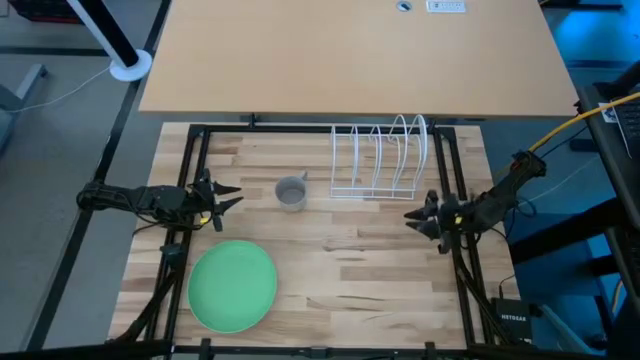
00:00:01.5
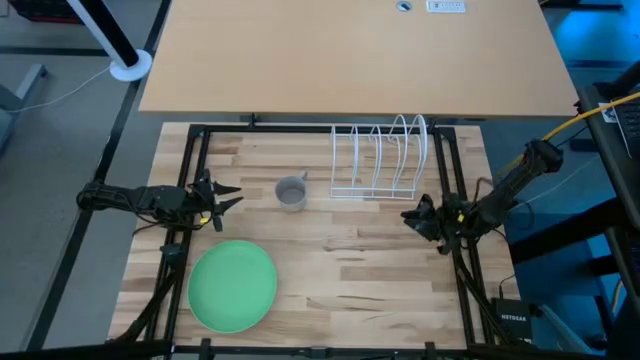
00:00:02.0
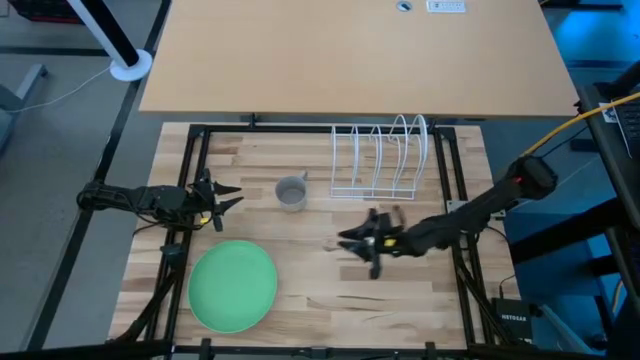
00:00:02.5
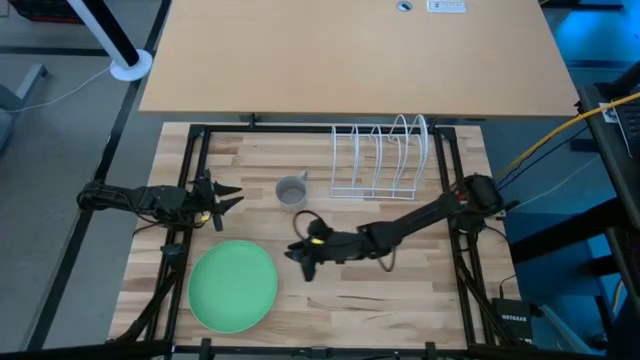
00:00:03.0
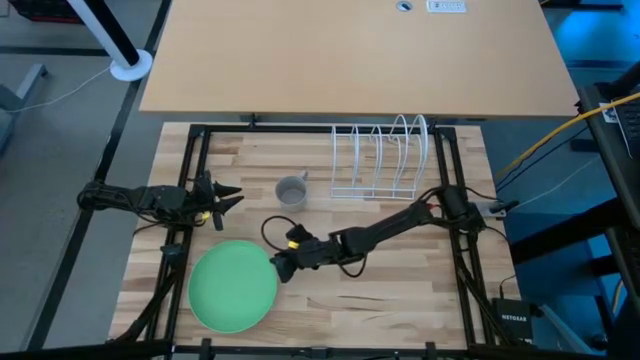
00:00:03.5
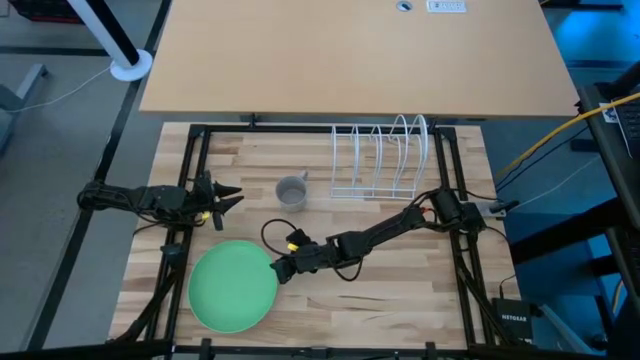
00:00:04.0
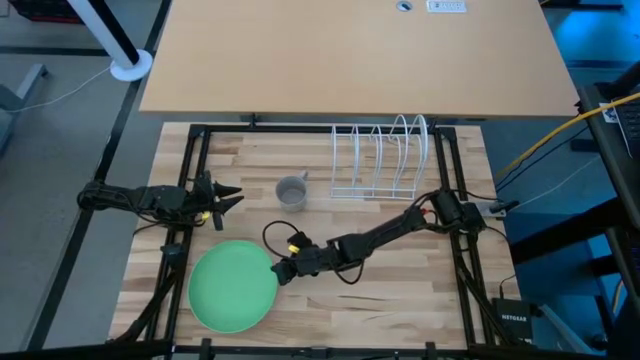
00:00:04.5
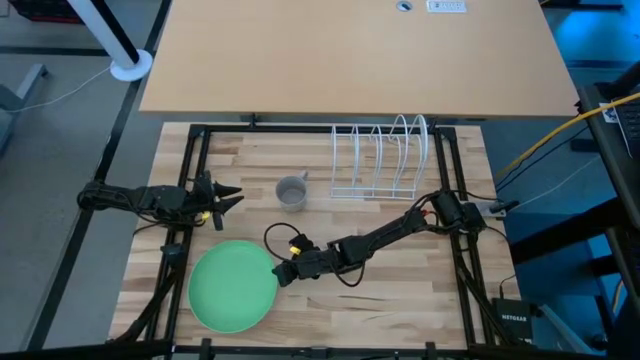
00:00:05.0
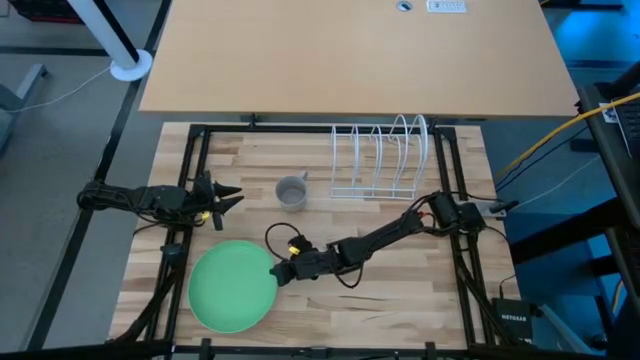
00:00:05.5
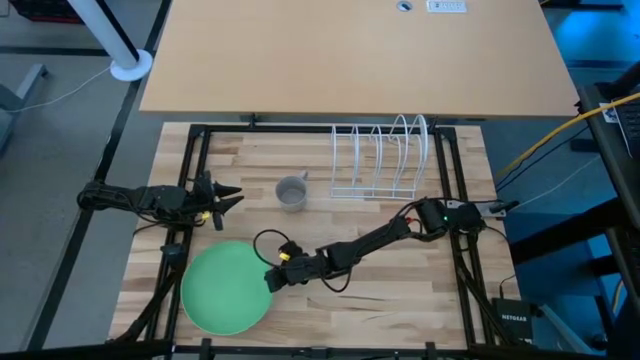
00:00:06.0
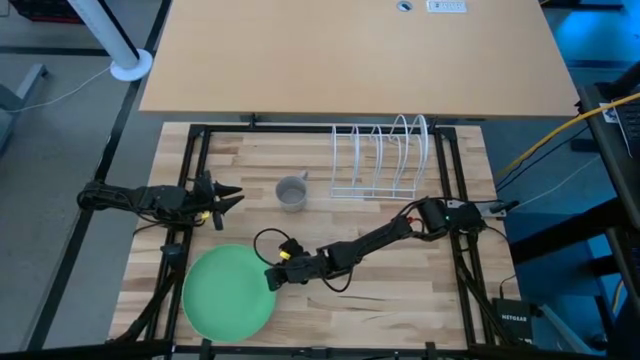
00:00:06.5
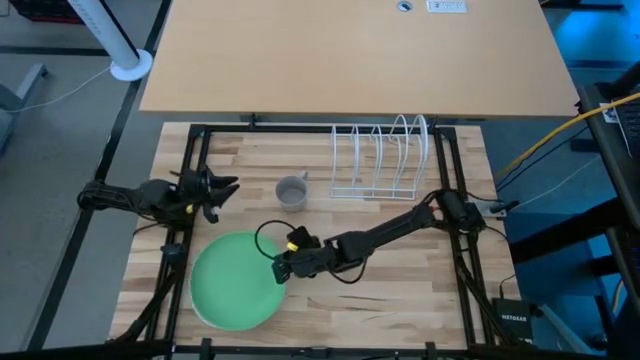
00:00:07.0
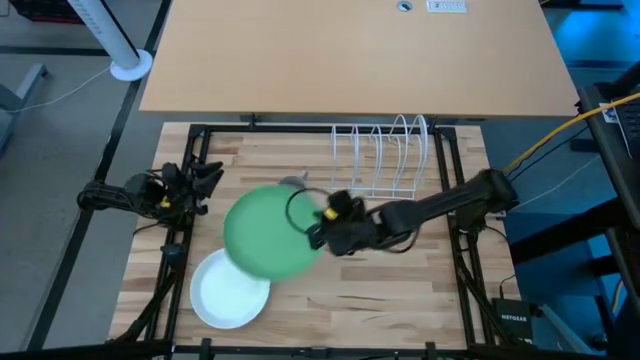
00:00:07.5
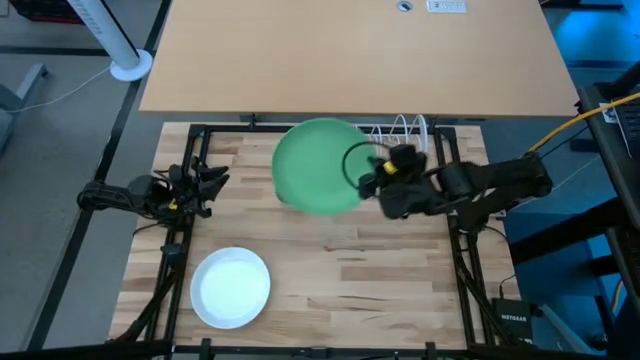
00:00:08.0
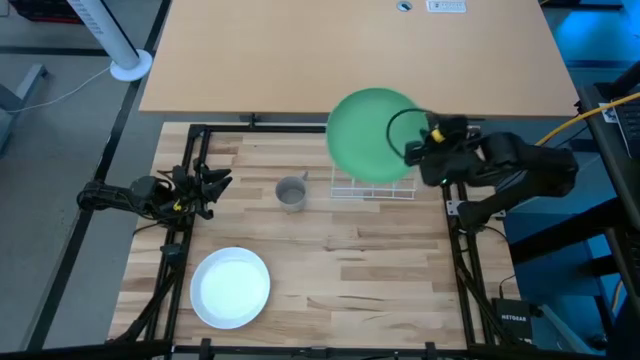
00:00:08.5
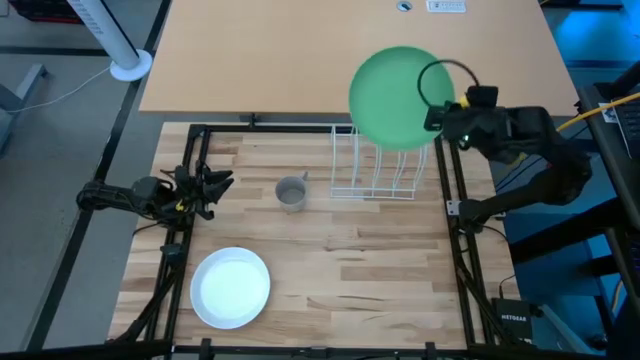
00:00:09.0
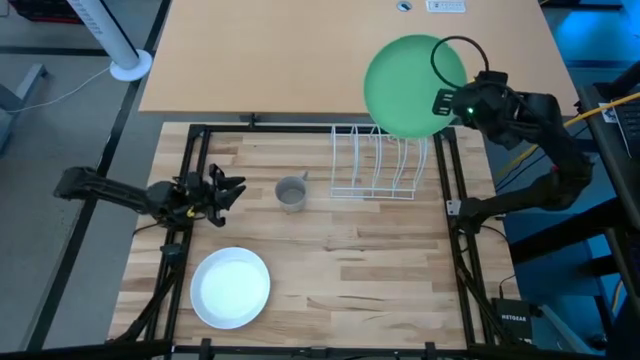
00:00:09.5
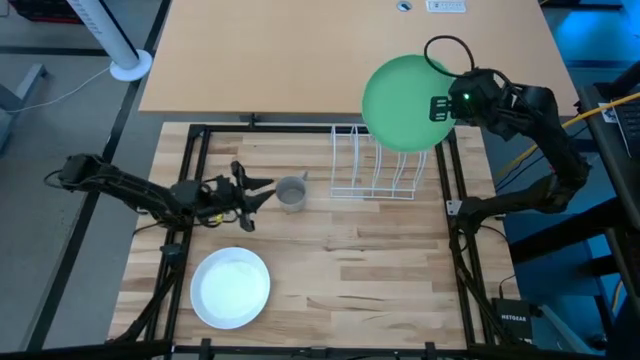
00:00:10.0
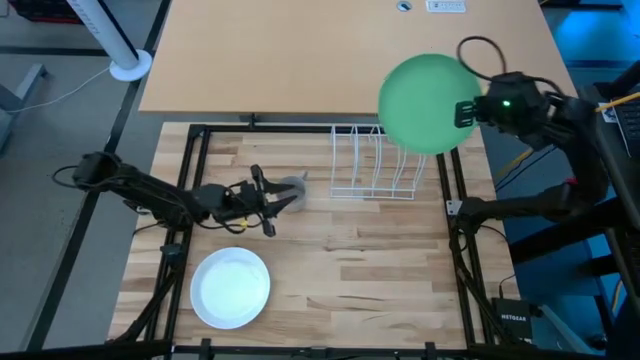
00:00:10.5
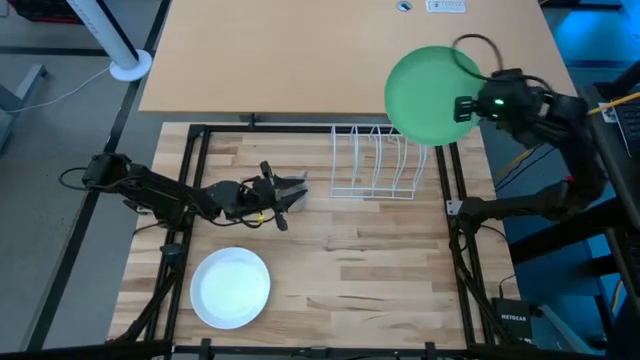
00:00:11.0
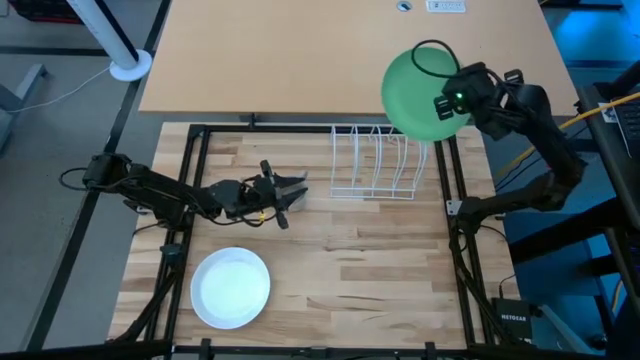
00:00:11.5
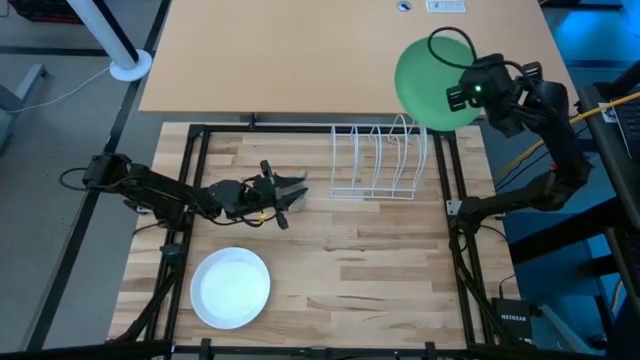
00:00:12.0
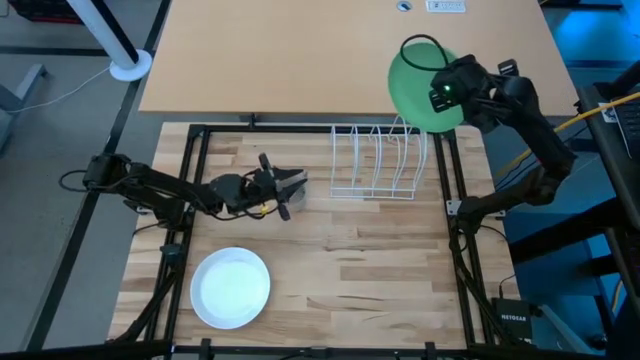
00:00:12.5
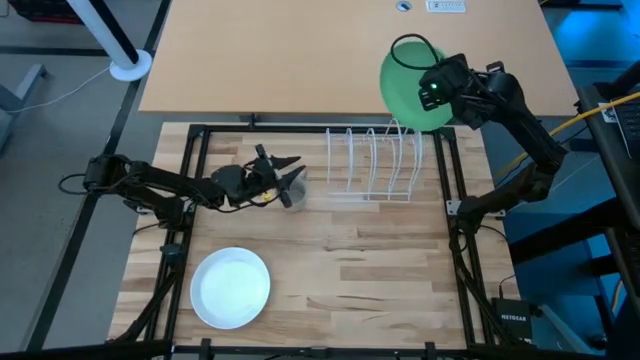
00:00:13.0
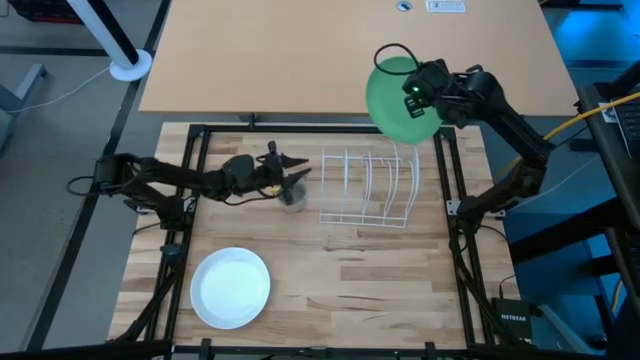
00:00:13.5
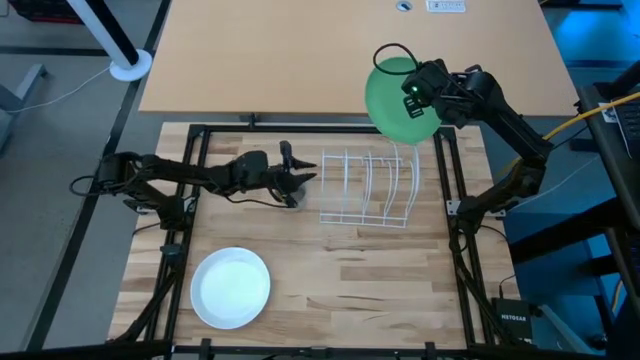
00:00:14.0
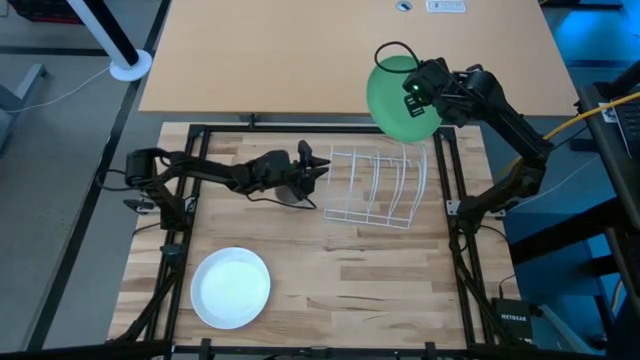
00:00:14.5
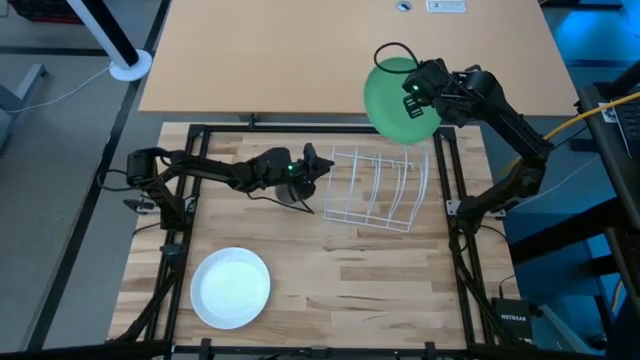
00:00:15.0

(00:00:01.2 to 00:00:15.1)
Task: Sort dishes
Put the green plate in the dish rack

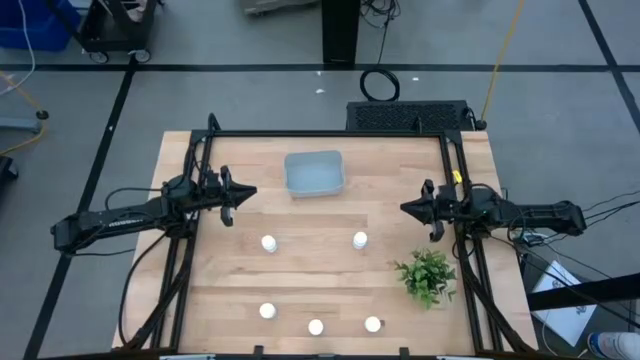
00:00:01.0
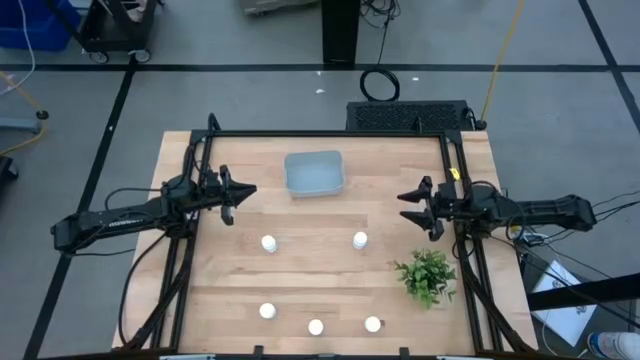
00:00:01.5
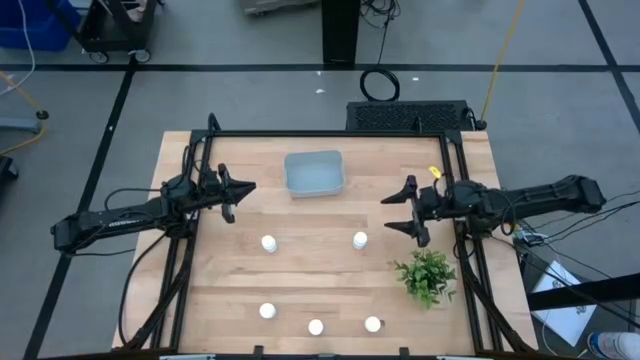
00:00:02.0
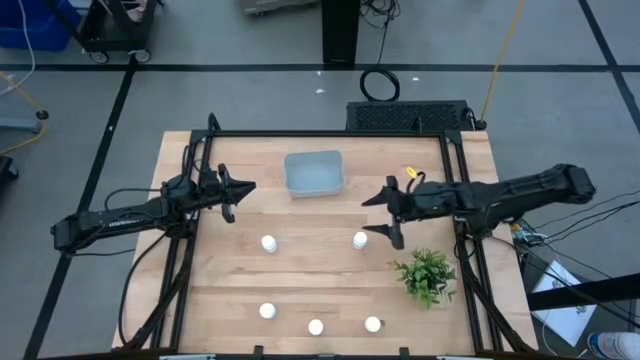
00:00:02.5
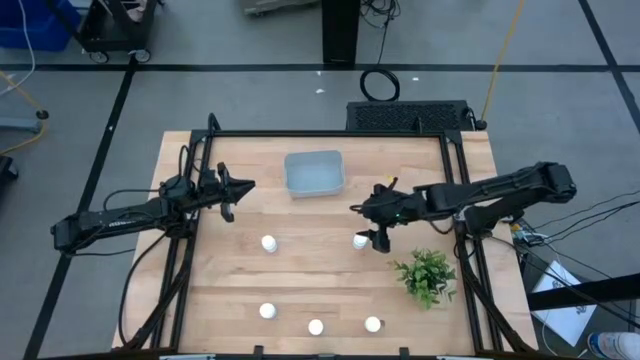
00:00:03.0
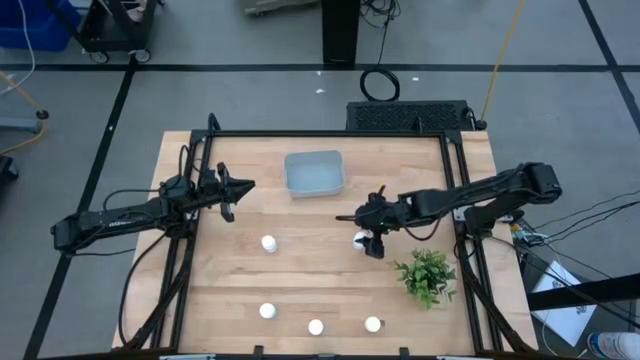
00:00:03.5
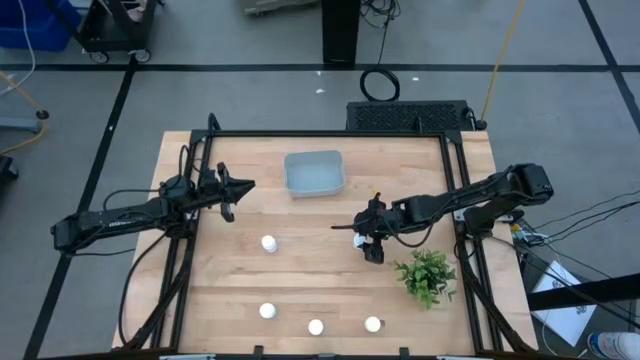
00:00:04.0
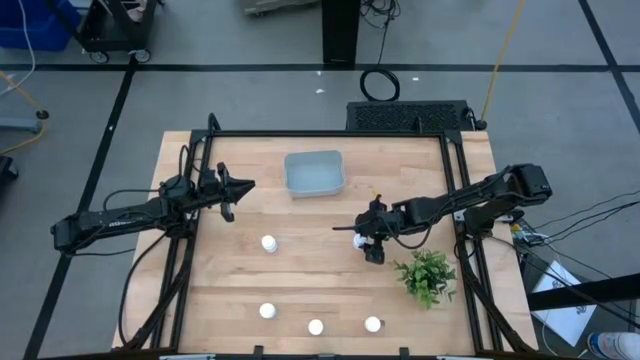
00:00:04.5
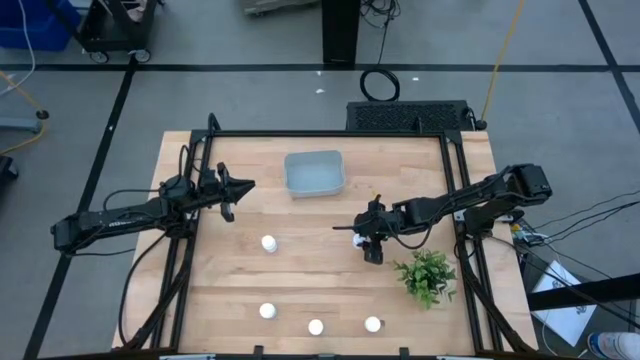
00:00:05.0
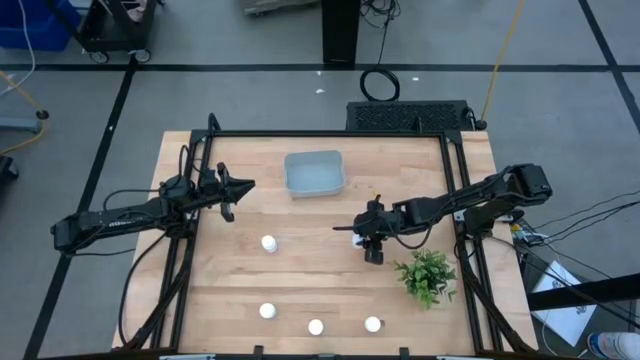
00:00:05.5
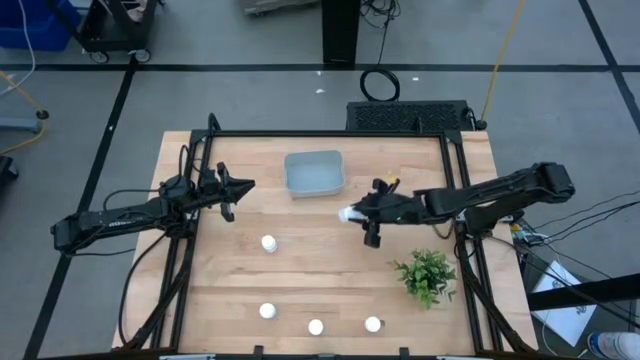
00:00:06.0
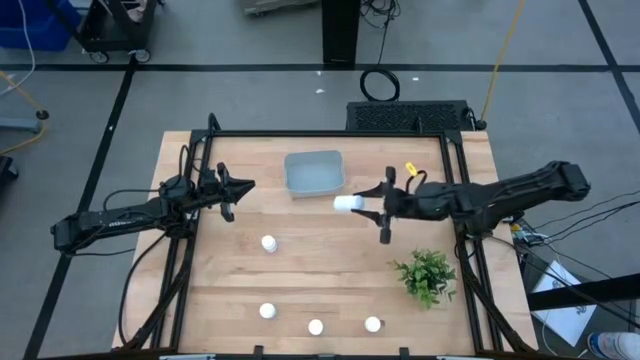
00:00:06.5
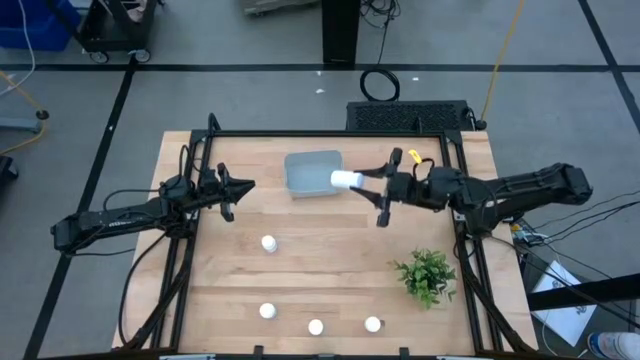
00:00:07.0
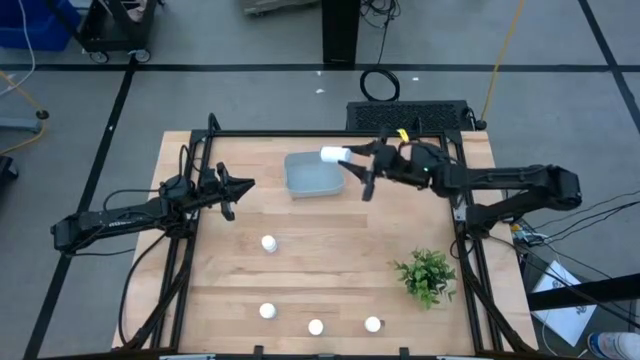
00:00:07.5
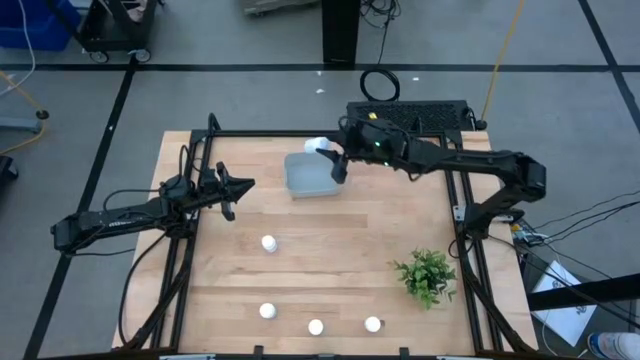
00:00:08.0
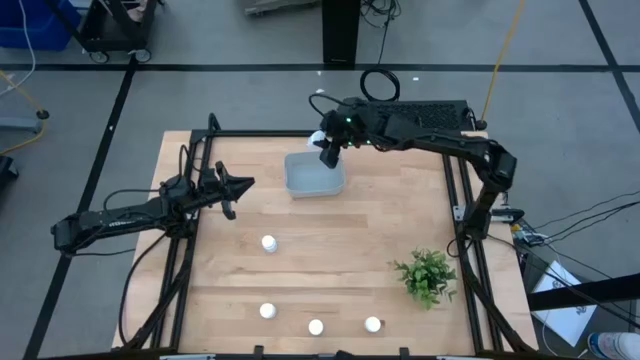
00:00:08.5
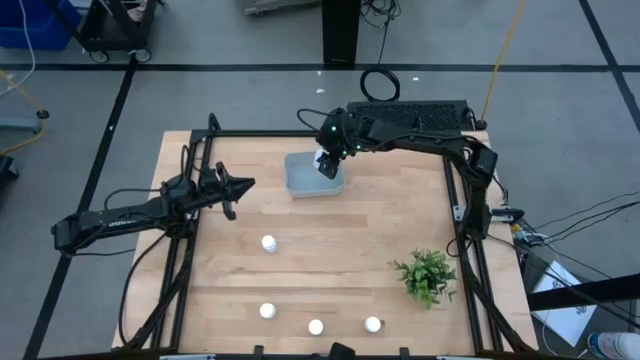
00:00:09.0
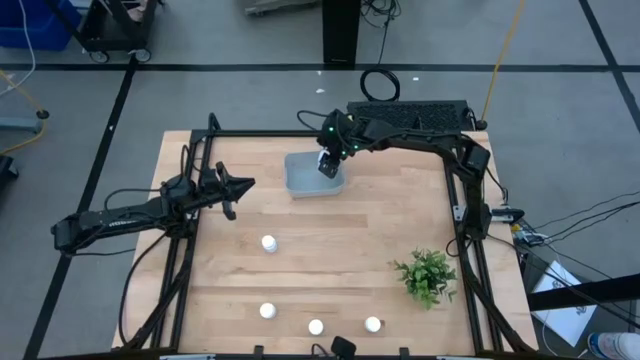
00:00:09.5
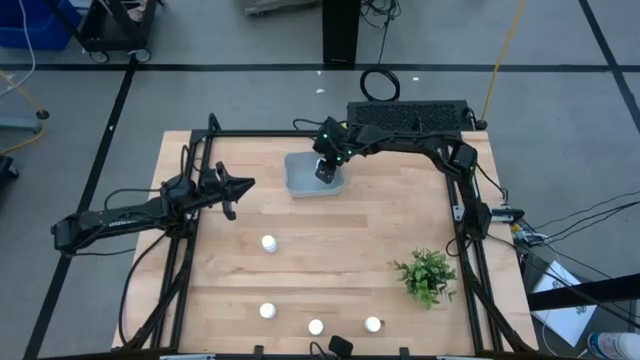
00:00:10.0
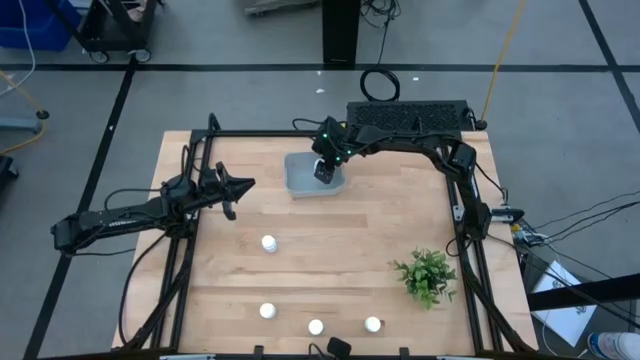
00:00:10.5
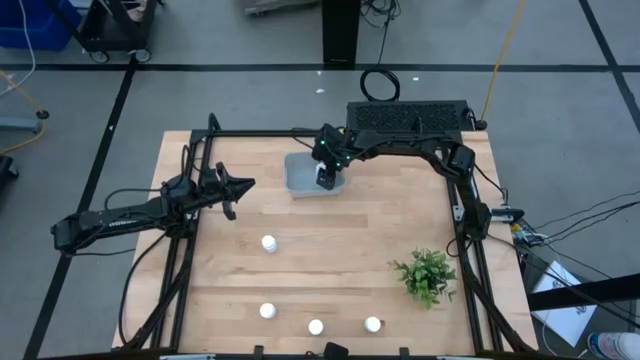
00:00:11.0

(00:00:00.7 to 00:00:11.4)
Task: Pick and place pill bottles into a basket
Put the white bottle into the gray bin
